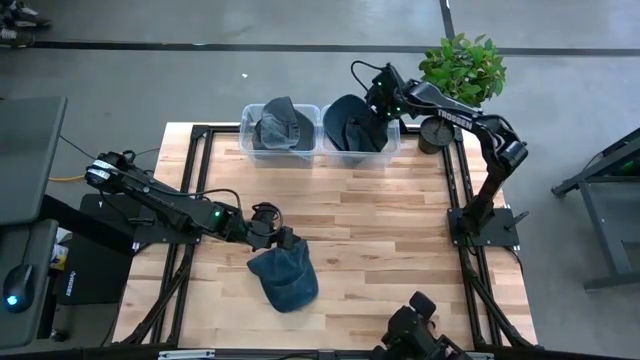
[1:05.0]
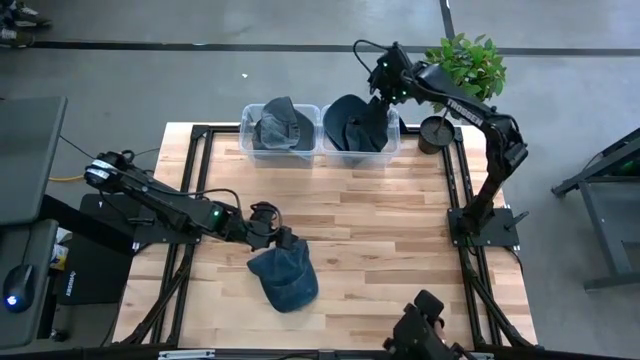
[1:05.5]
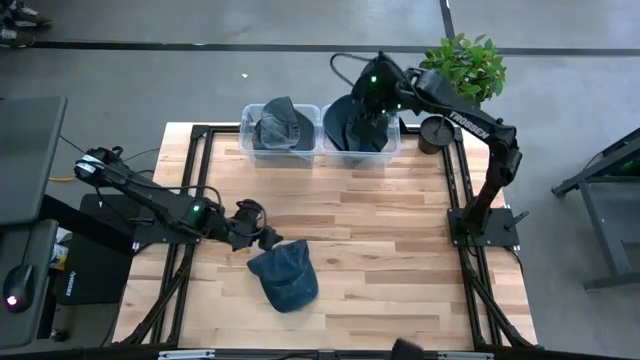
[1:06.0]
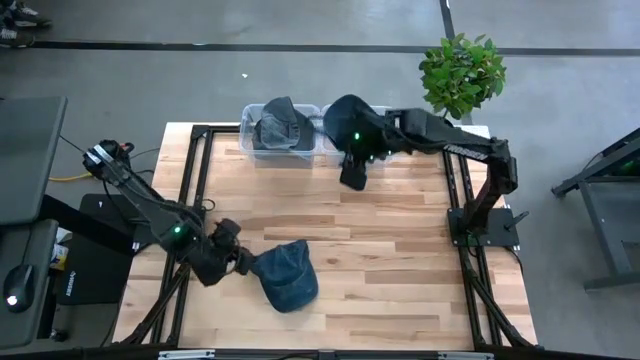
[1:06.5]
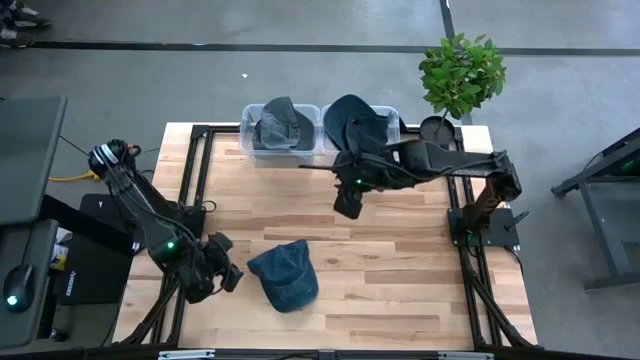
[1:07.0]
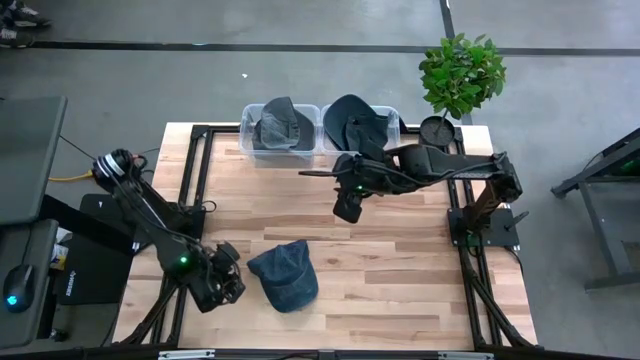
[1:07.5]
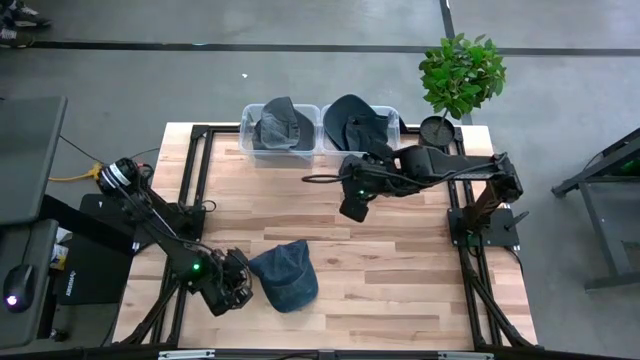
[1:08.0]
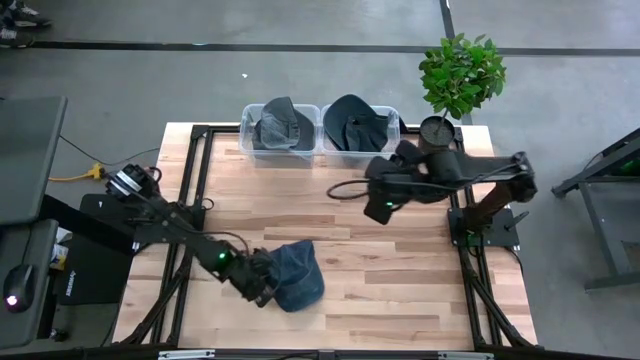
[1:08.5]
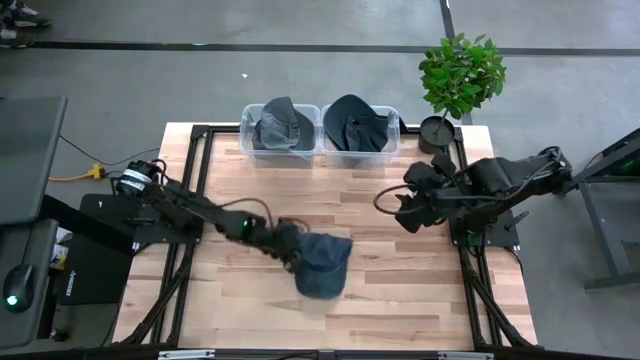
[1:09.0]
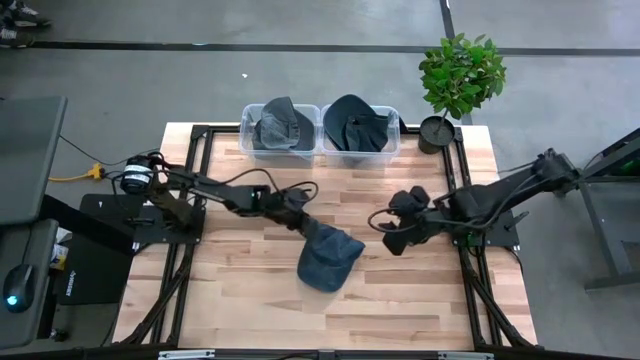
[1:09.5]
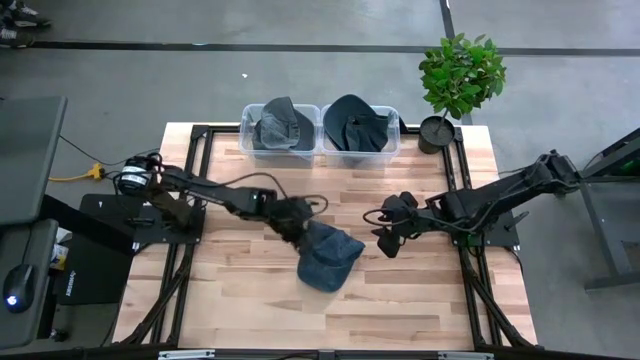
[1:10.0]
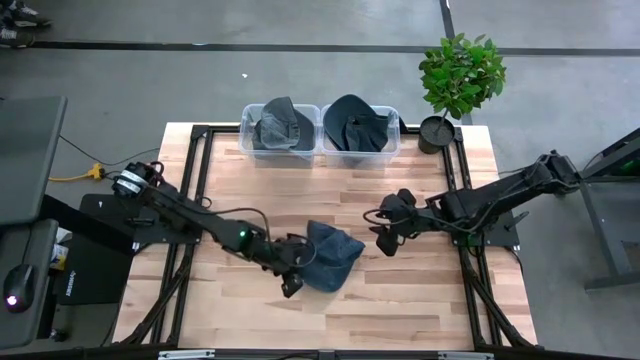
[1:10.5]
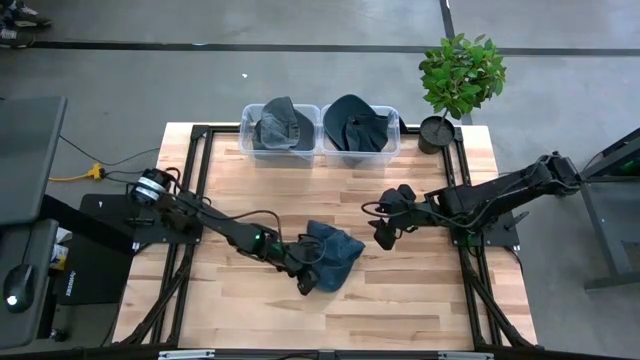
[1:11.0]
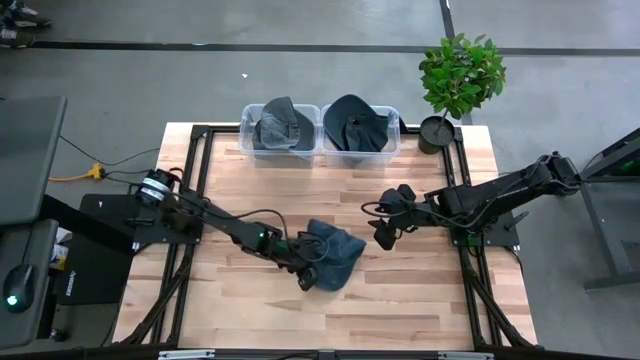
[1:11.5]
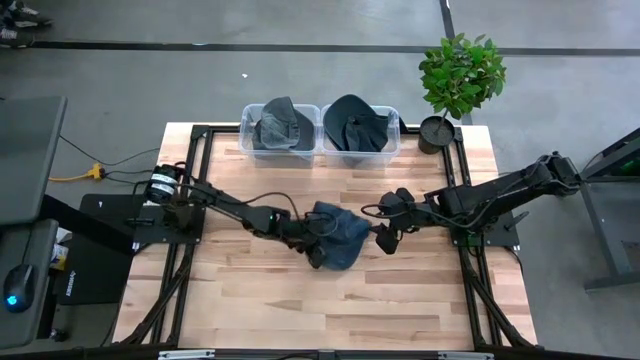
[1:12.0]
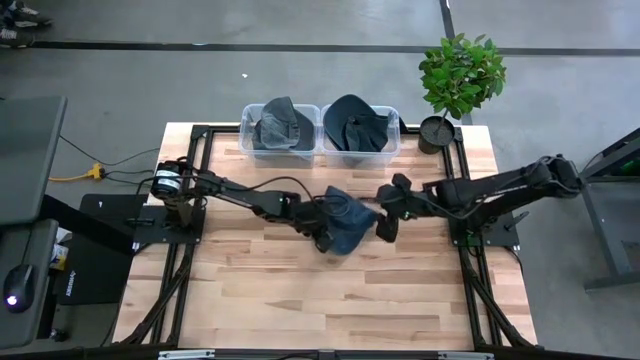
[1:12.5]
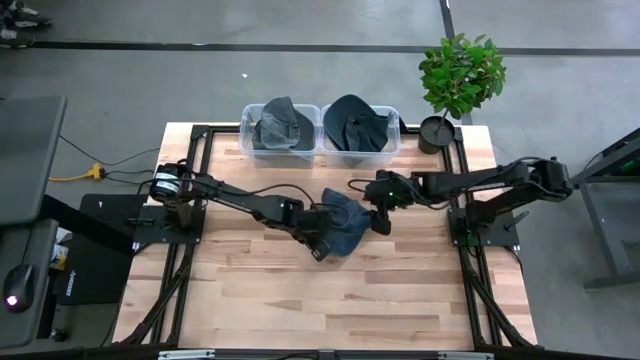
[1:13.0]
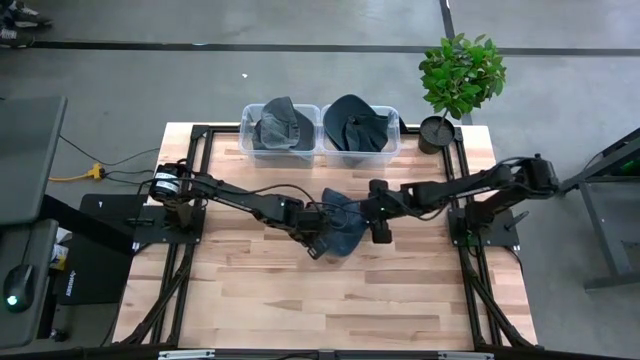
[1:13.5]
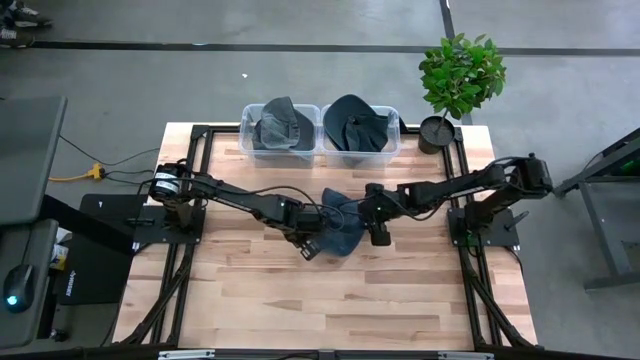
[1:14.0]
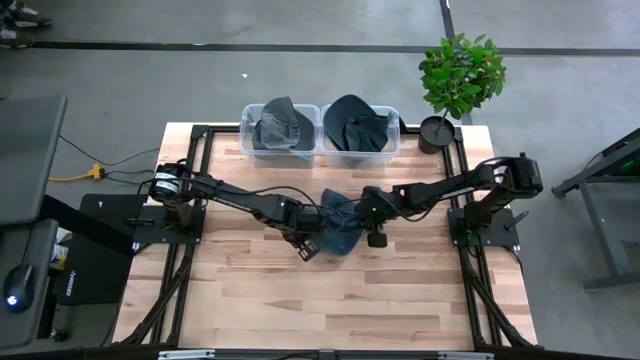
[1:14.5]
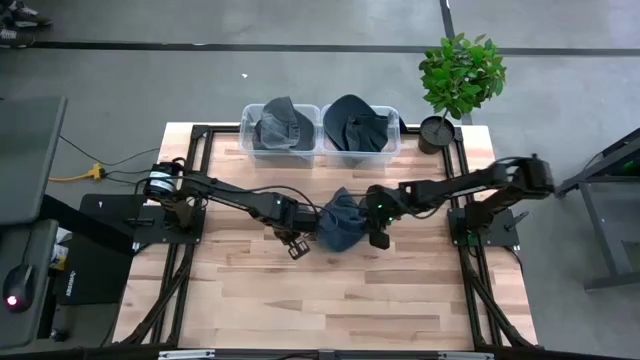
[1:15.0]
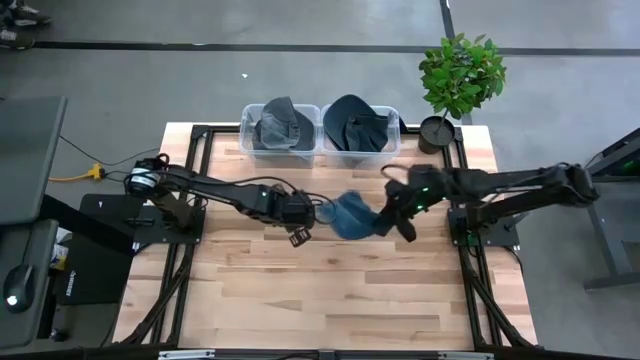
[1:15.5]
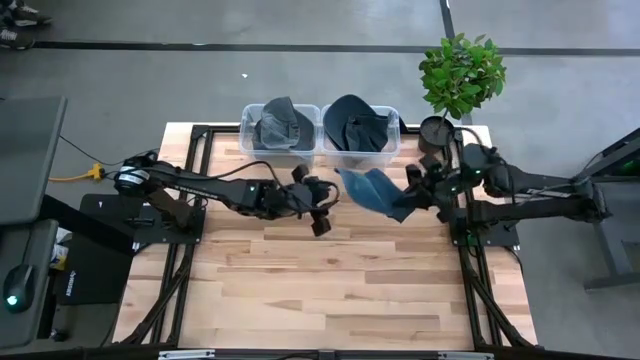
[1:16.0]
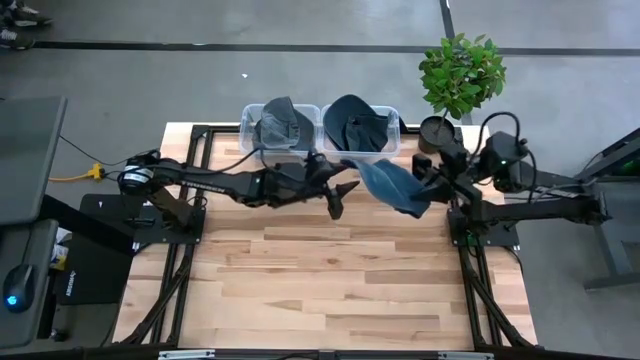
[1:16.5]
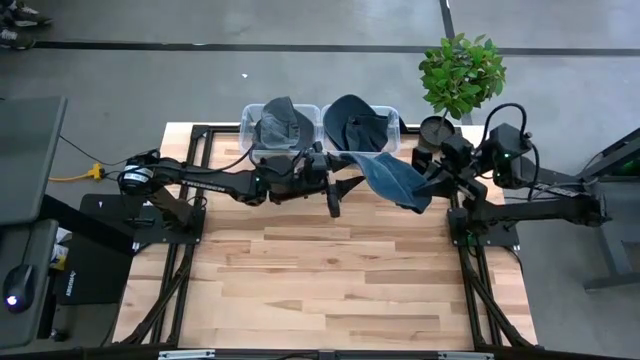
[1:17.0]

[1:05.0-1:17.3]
Task: Pick and place caps into container
Put the blue cap into the right transparent container

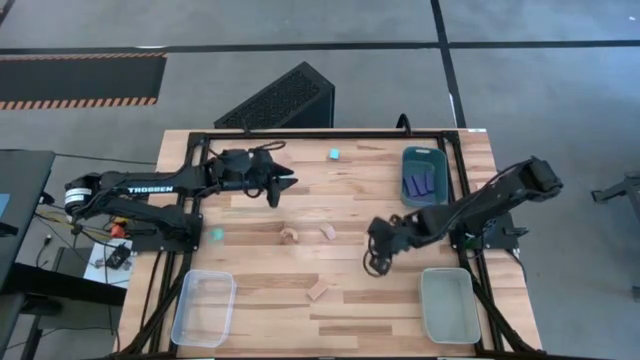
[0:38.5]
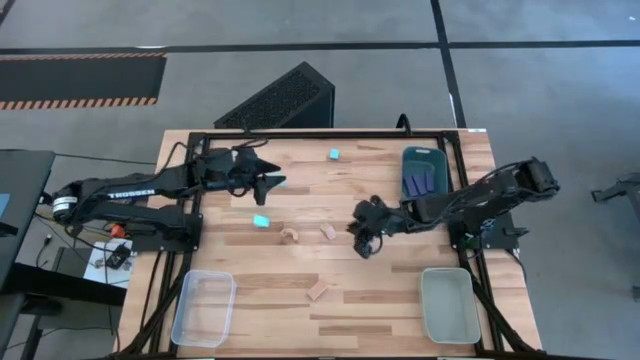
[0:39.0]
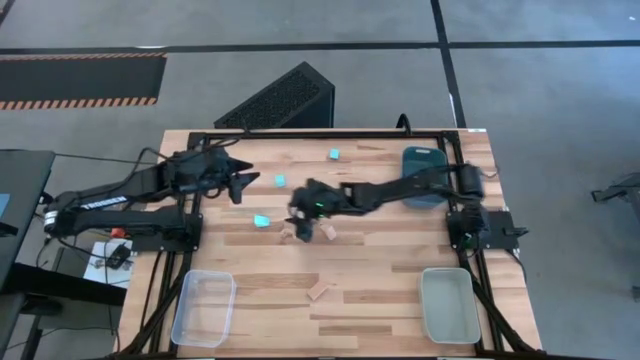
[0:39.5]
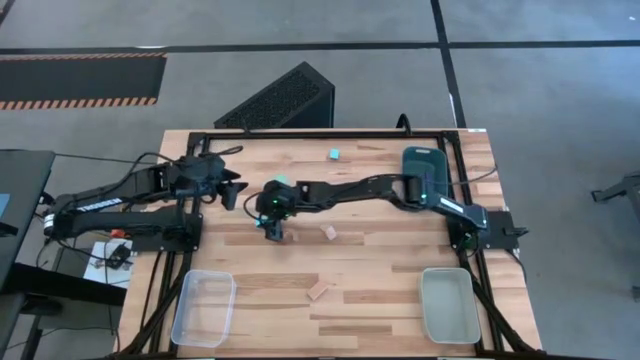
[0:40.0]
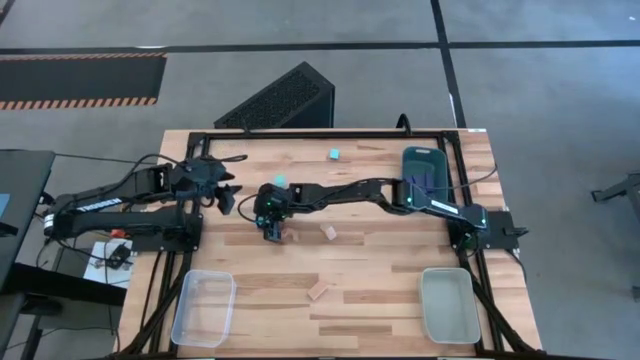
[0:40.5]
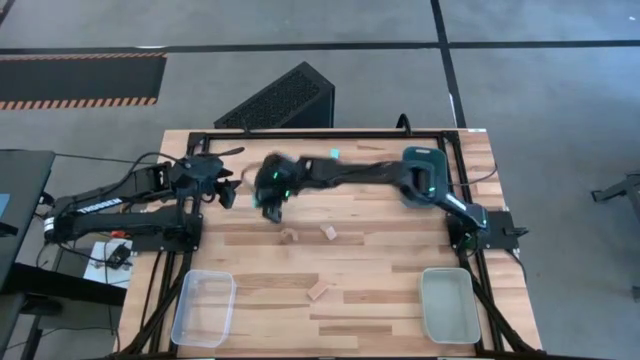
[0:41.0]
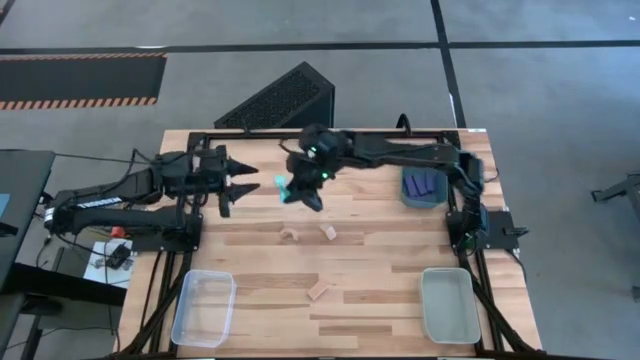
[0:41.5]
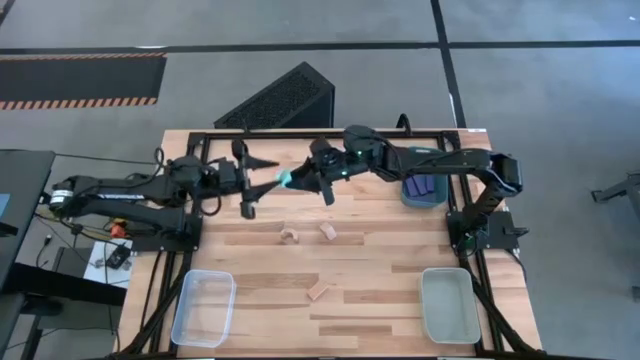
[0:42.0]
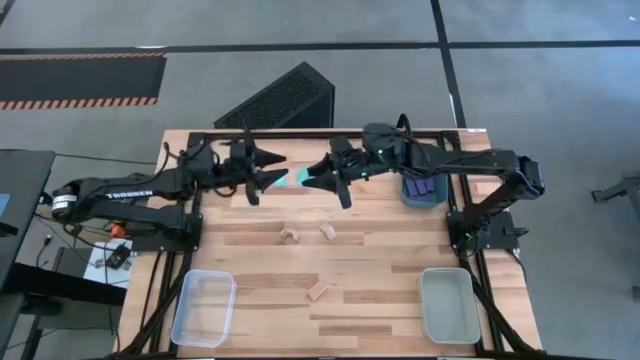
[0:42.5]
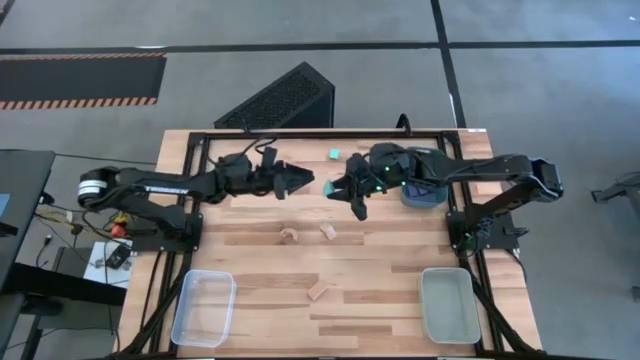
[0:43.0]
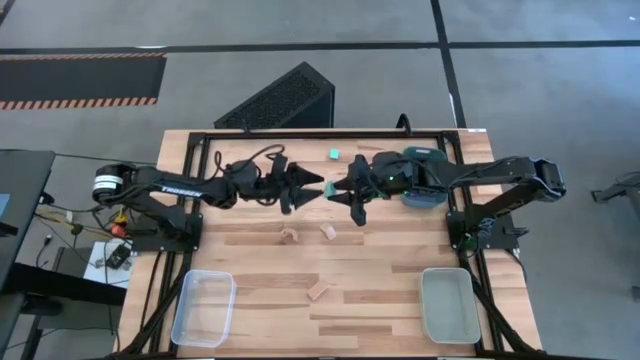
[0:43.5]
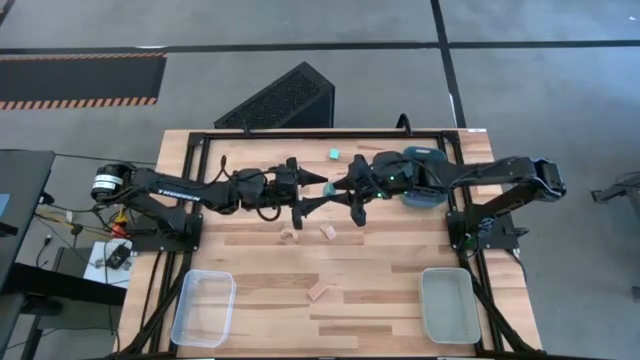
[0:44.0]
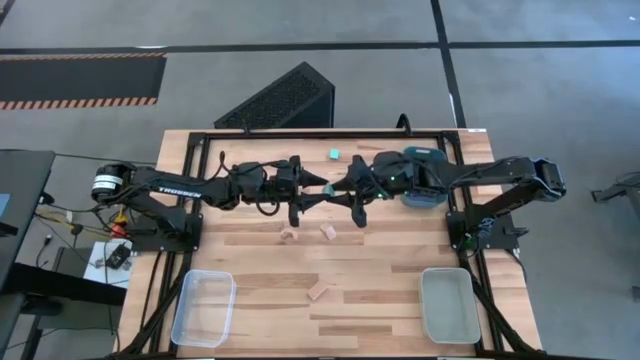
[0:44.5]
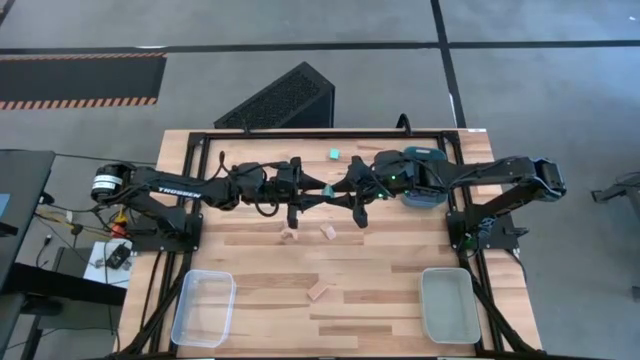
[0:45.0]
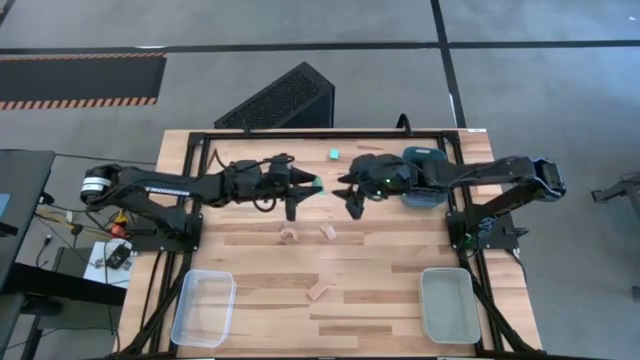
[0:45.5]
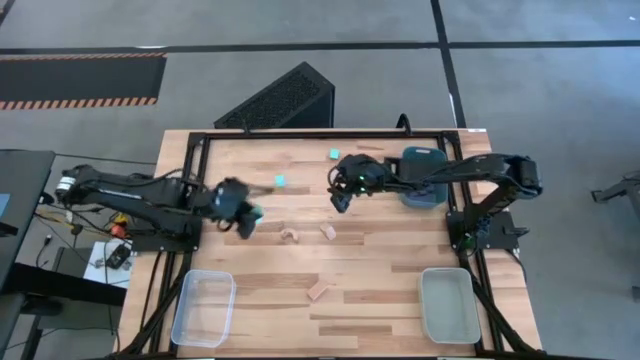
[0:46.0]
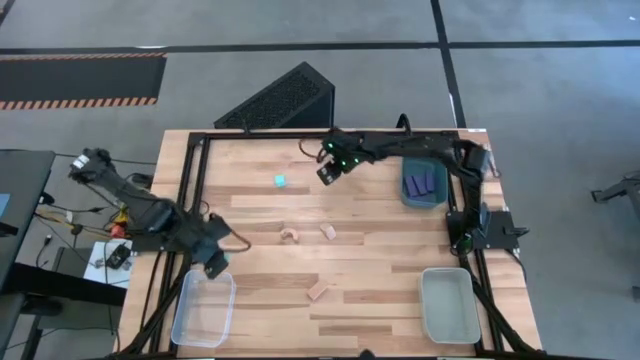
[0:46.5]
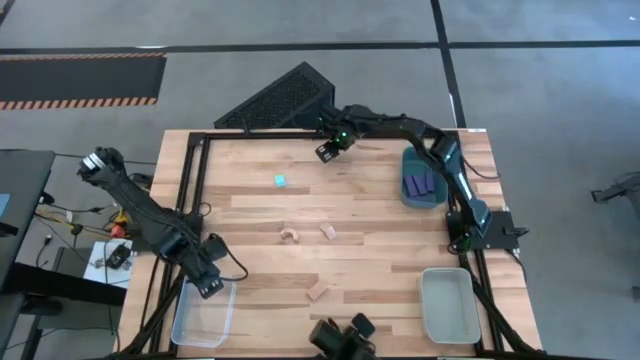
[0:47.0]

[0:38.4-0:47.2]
Task: Sort & place blocks by color
Put the light blue block into the transparent bin
